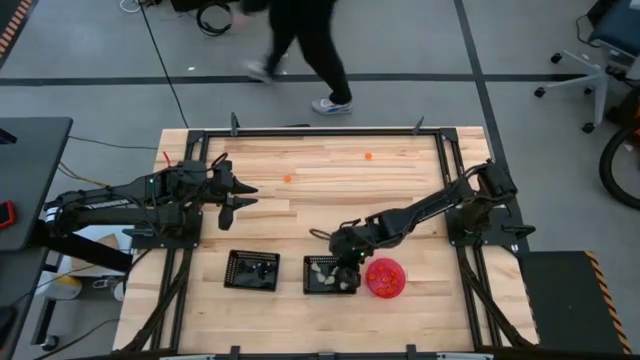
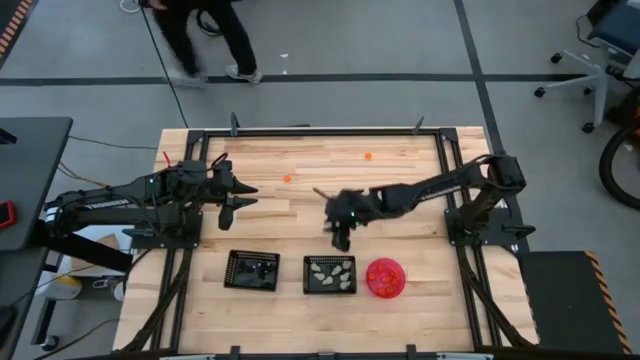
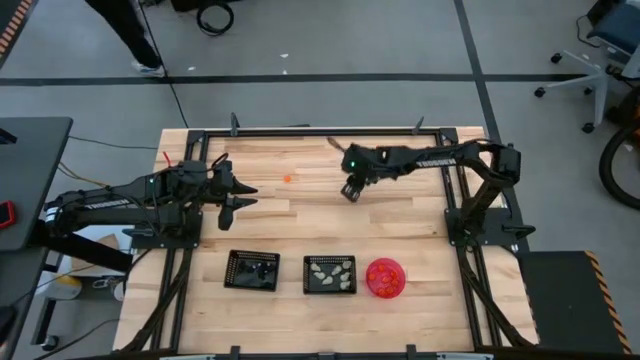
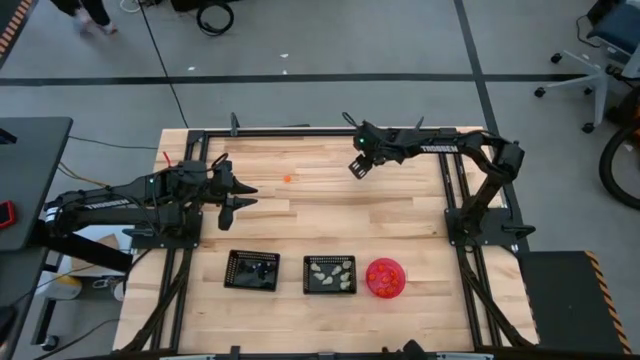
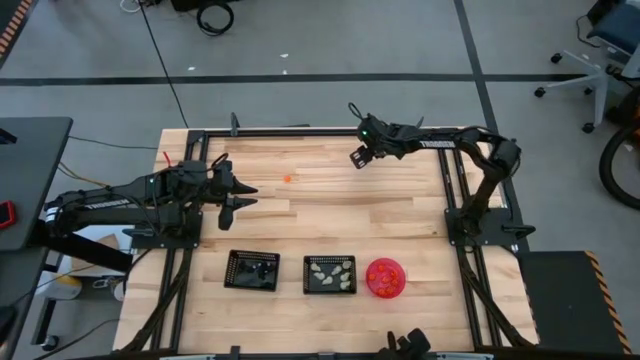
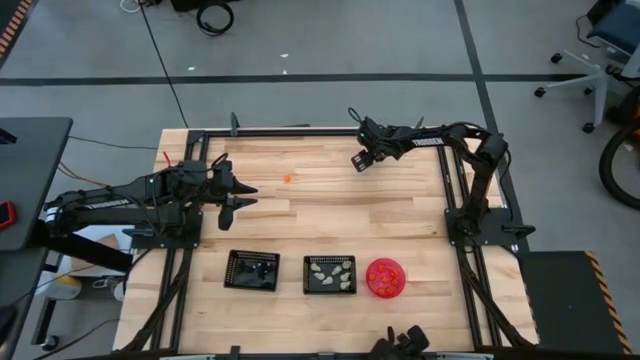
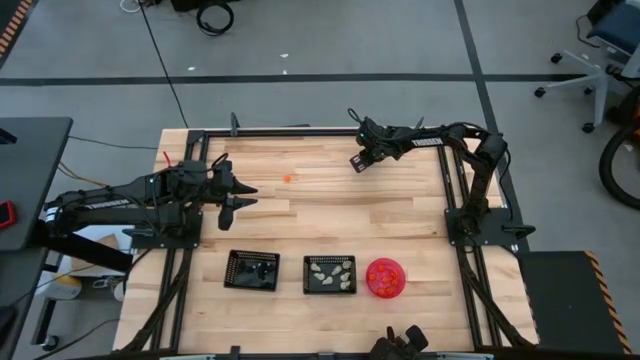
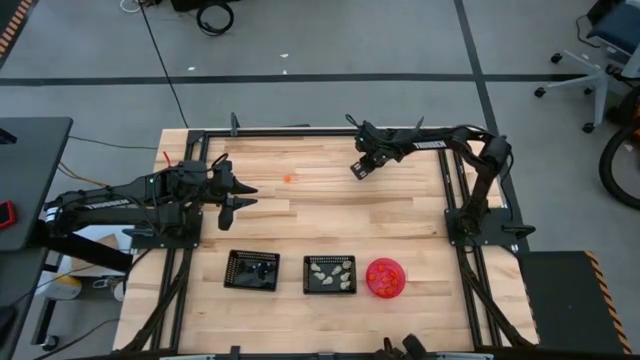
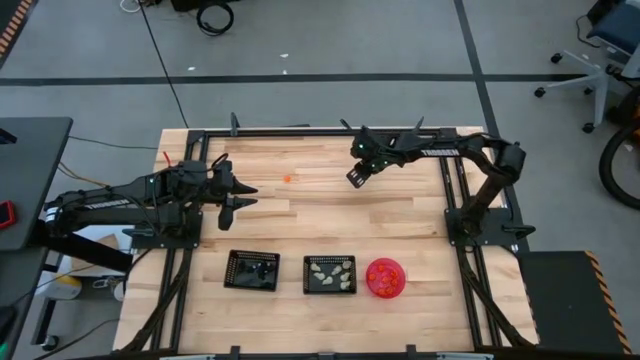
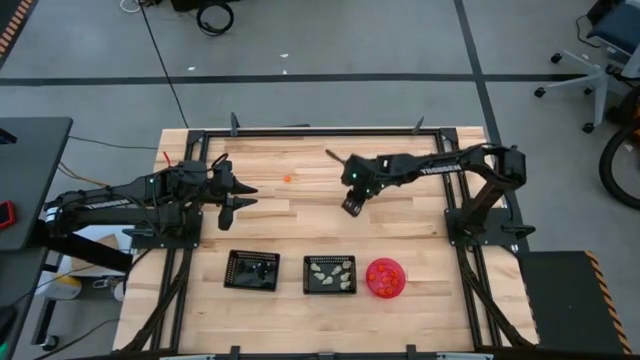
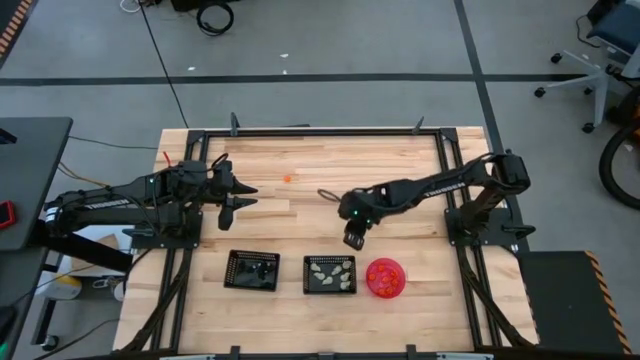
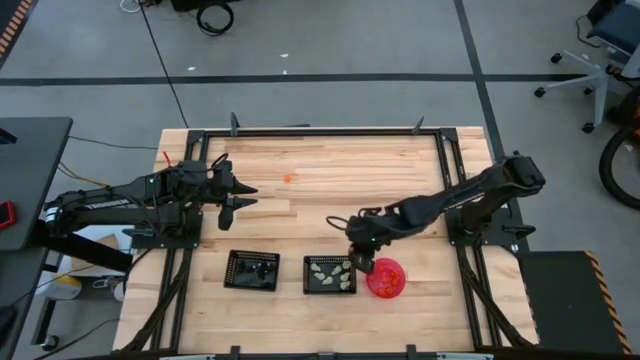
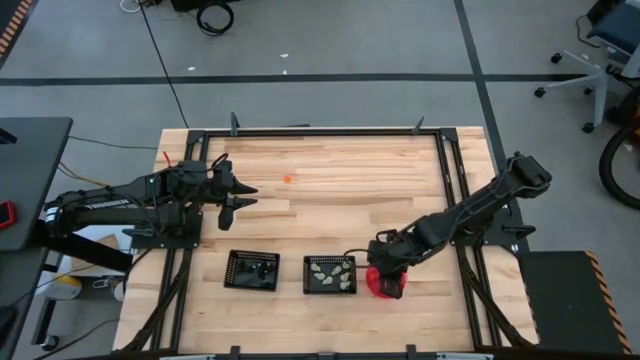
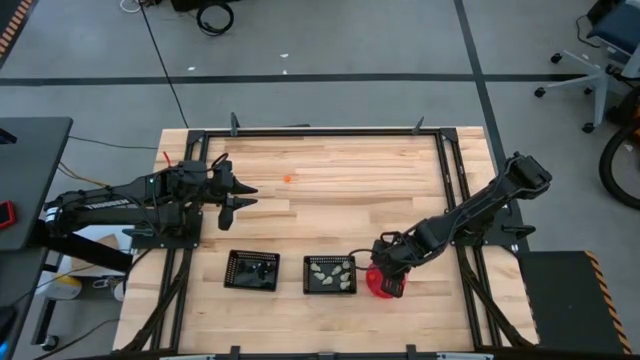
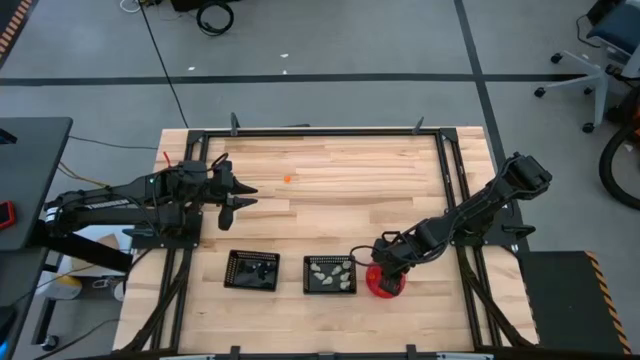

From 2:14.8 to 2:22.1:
Task: Sort Halloween decoration
Put the orange pumpkin toy into the pink bowl

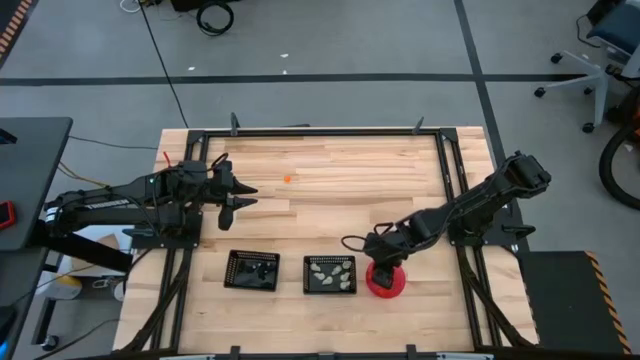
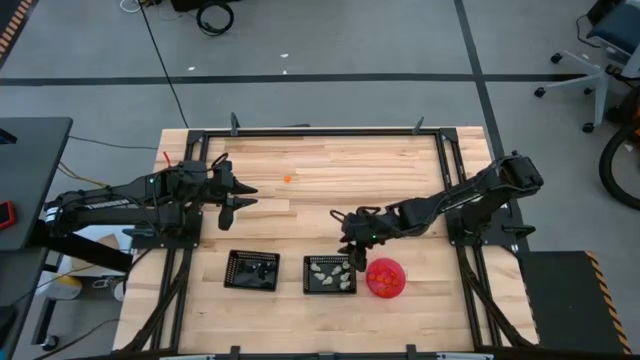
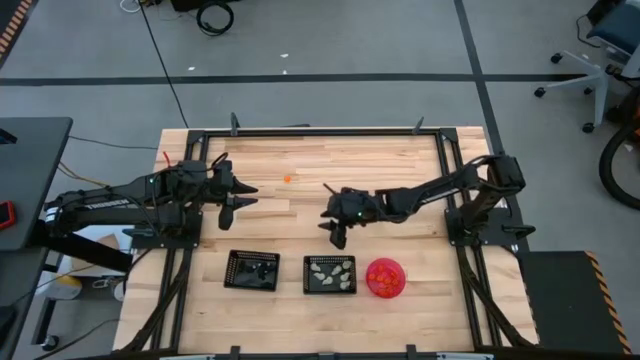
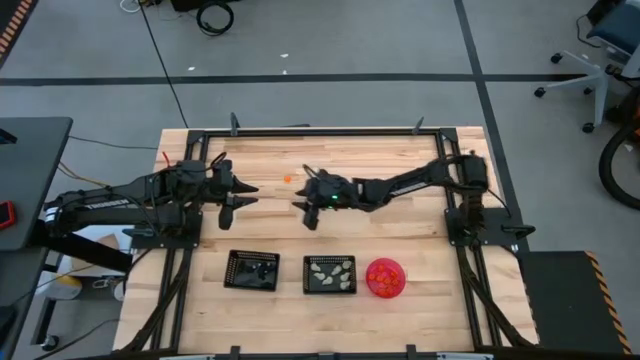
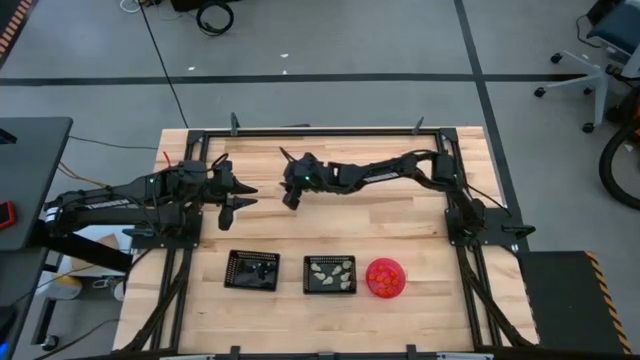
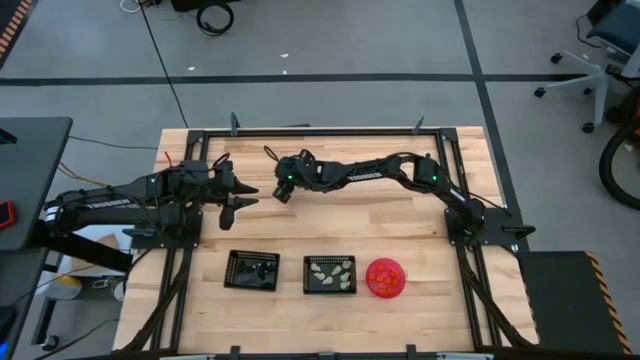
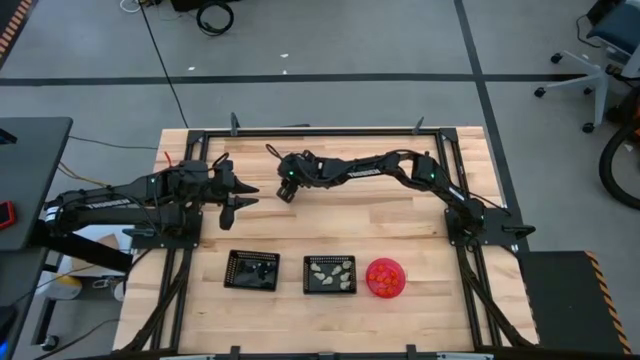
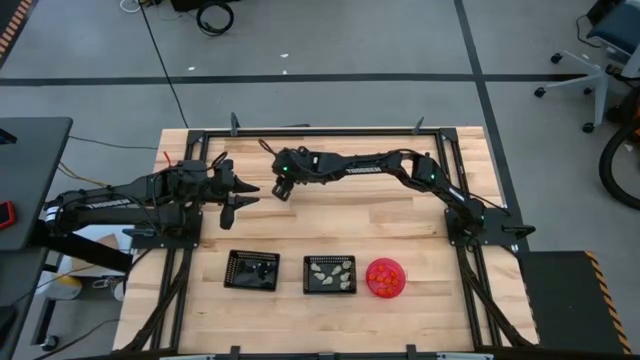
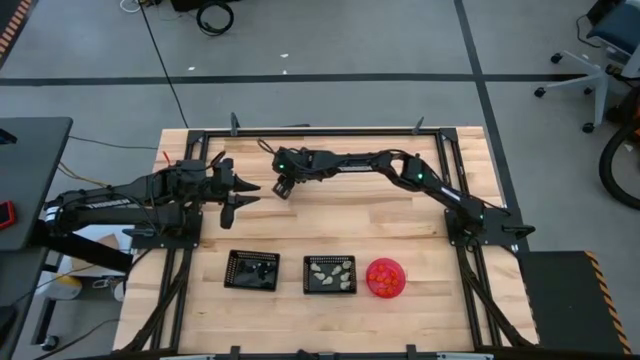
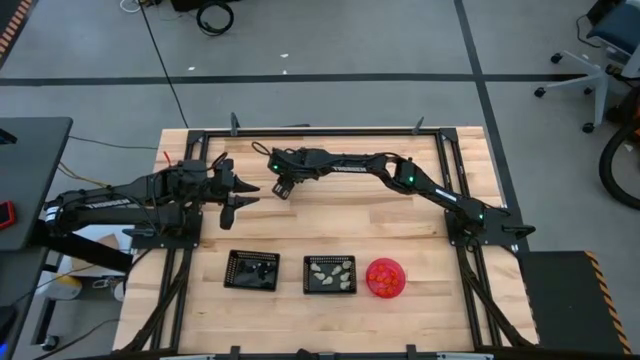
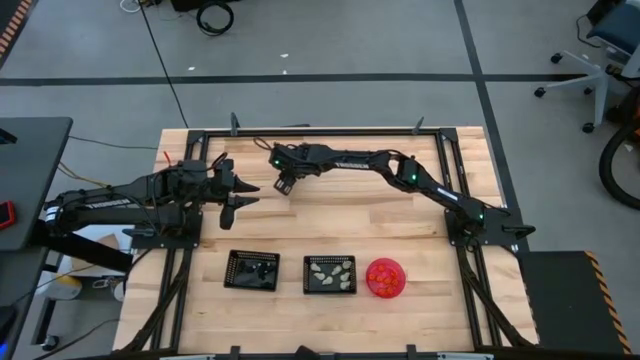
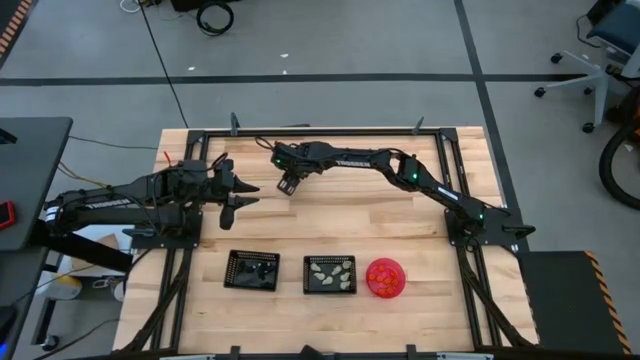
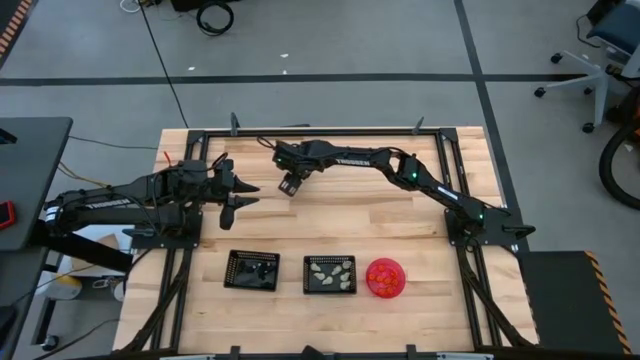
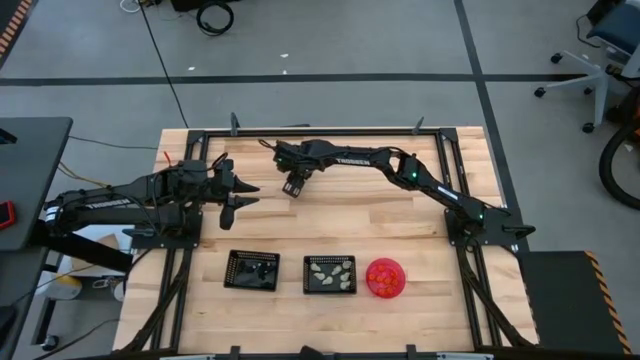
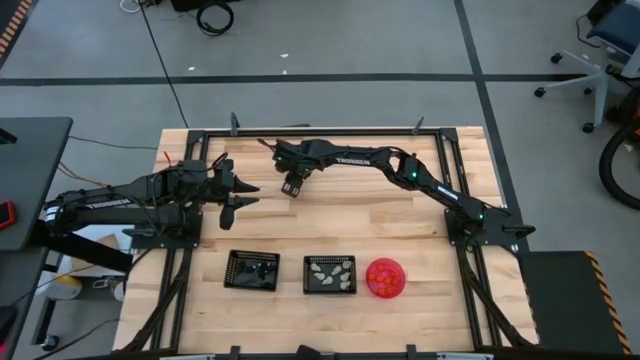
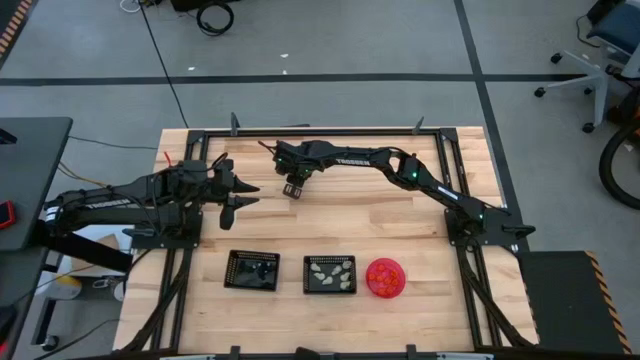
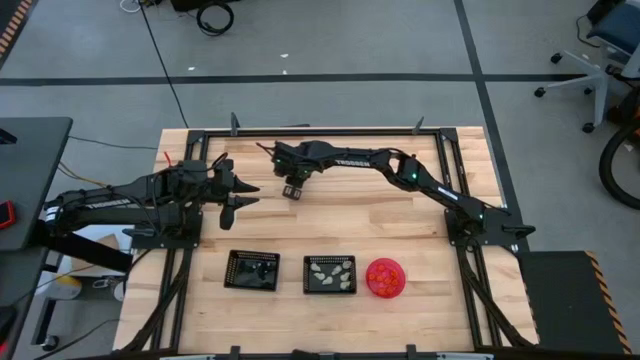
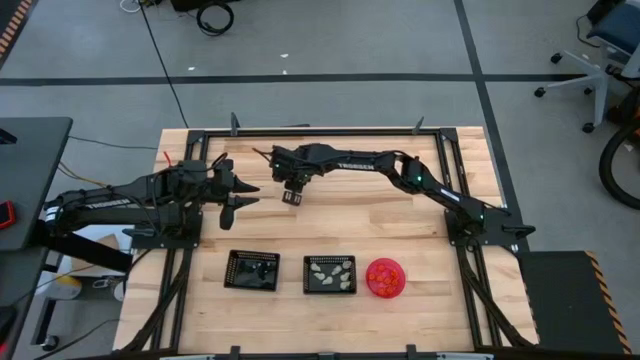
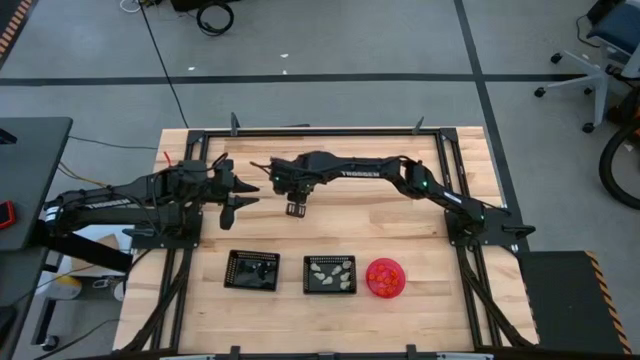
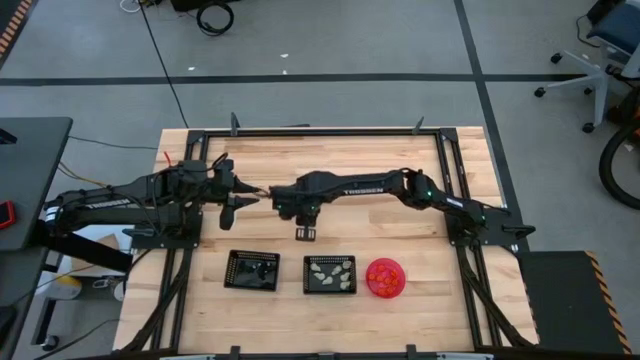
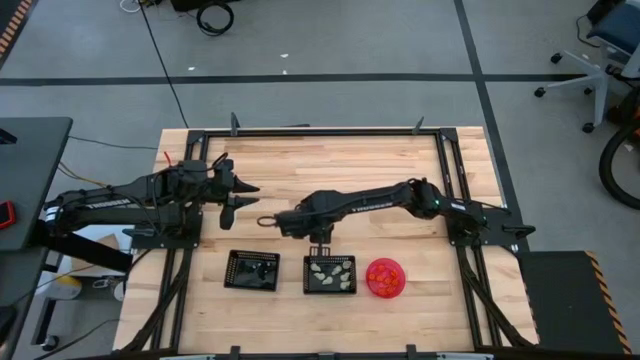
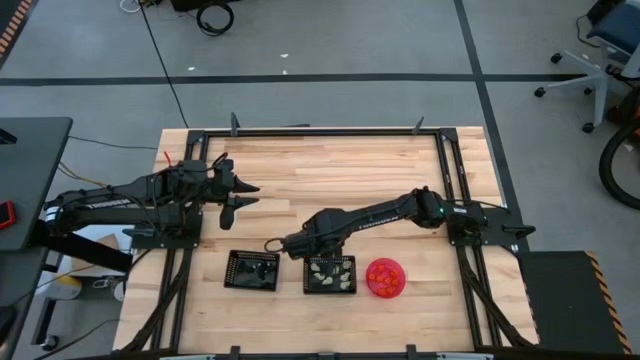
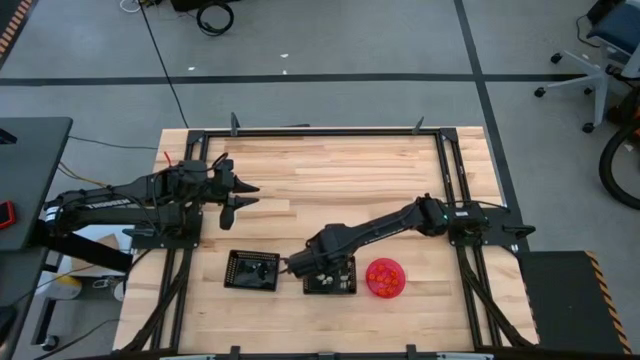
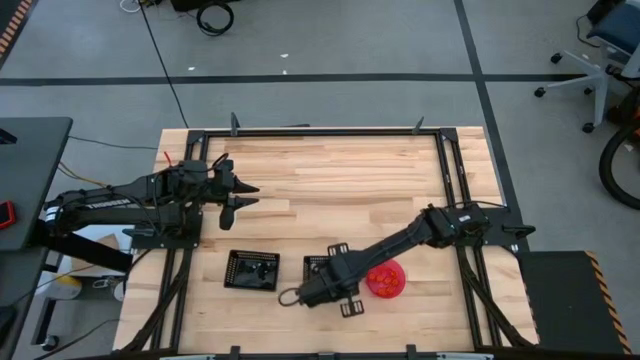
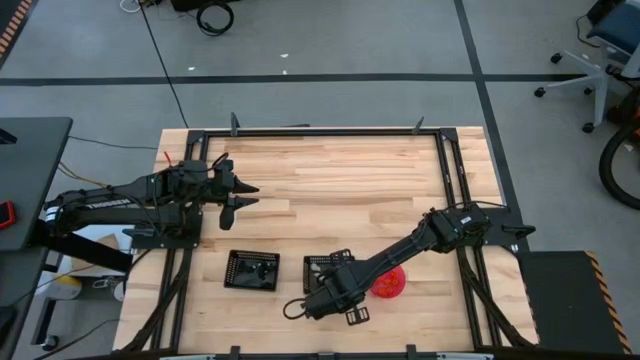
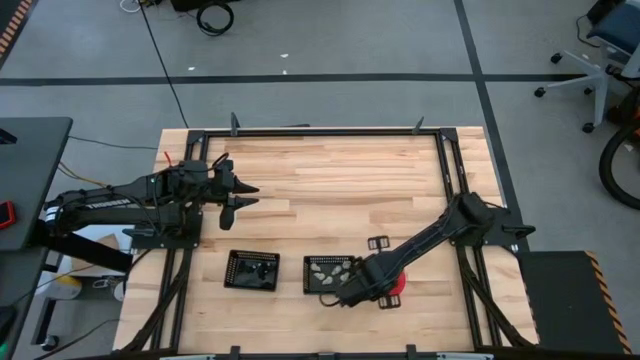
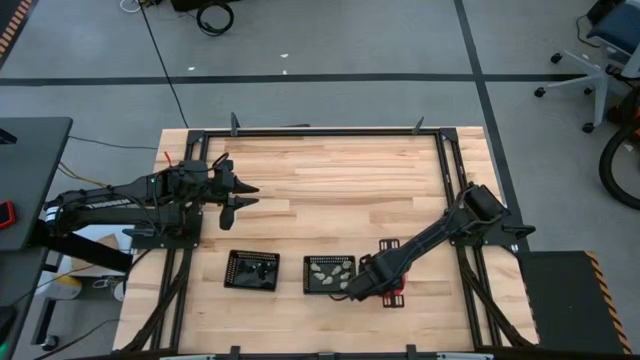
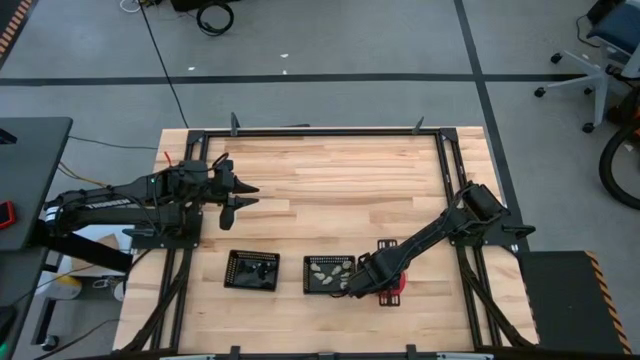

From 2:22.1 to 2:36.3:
Put the orange pumpkin toy into the pink bowl
